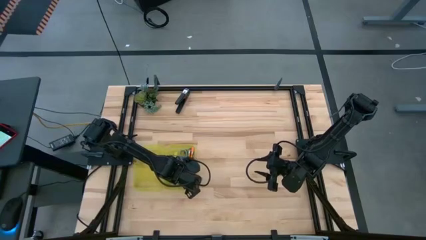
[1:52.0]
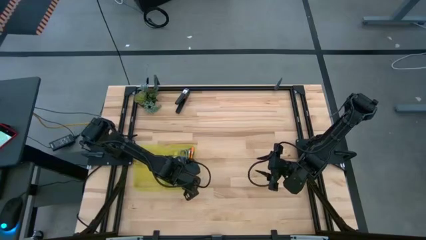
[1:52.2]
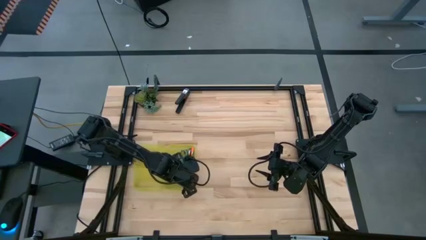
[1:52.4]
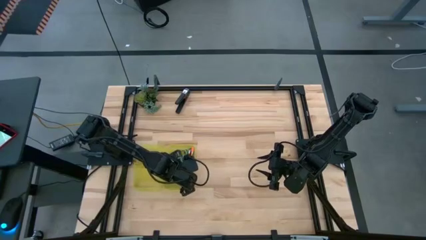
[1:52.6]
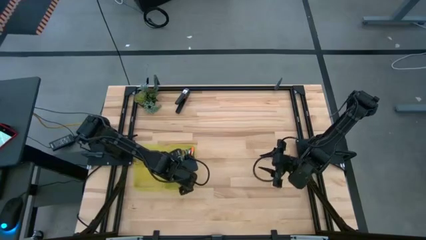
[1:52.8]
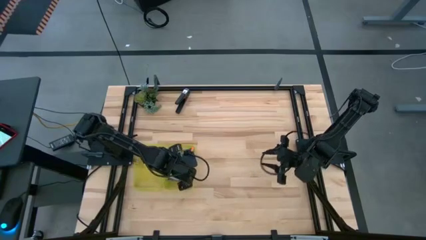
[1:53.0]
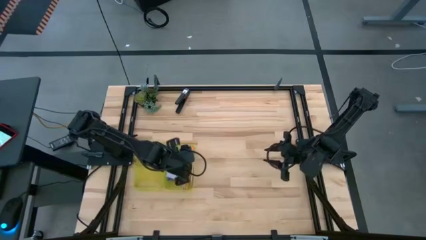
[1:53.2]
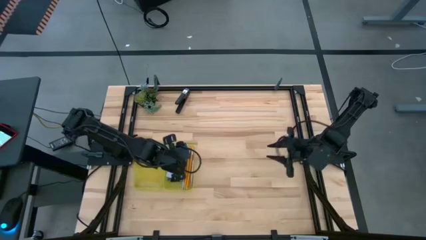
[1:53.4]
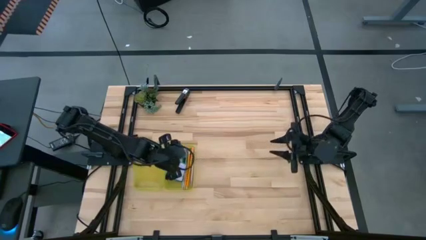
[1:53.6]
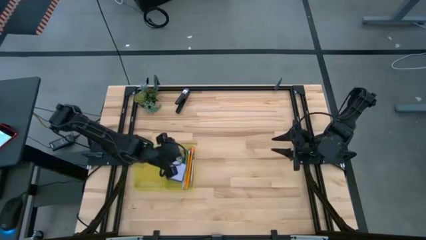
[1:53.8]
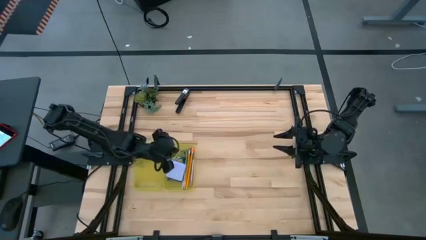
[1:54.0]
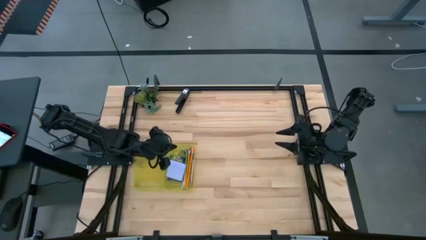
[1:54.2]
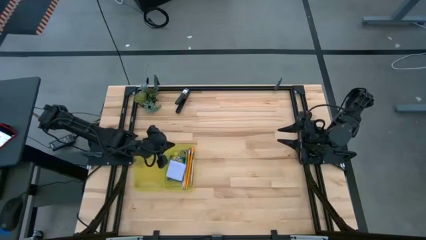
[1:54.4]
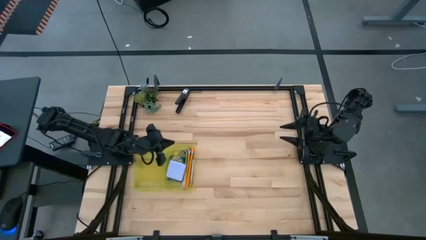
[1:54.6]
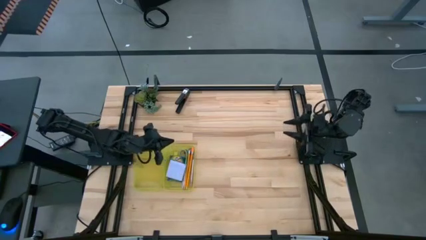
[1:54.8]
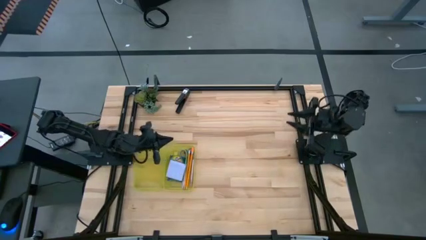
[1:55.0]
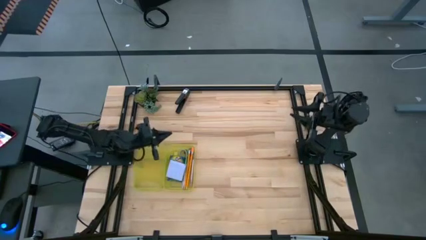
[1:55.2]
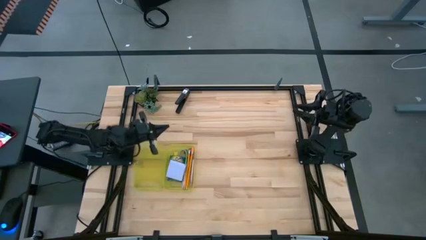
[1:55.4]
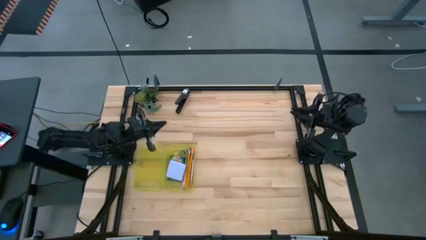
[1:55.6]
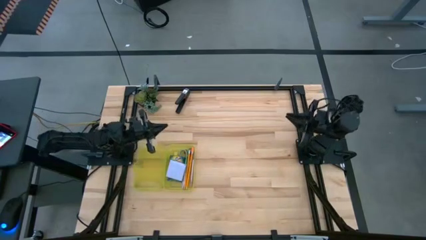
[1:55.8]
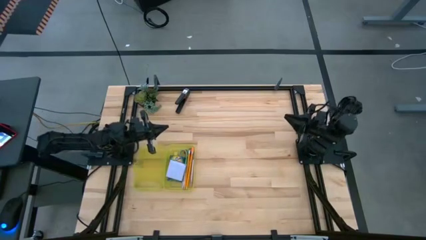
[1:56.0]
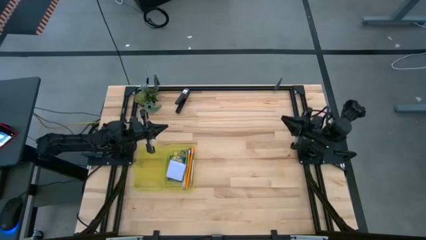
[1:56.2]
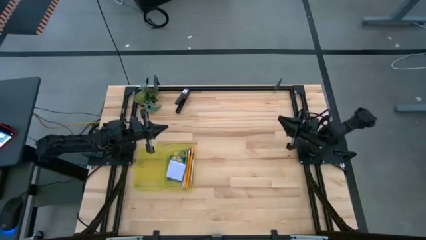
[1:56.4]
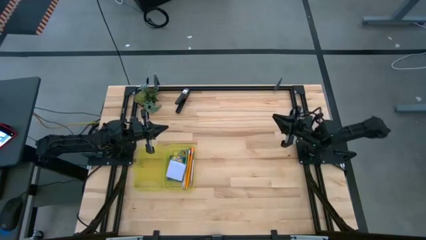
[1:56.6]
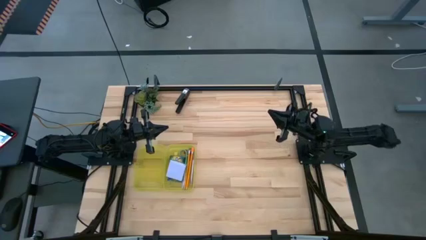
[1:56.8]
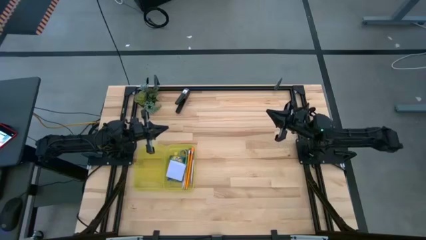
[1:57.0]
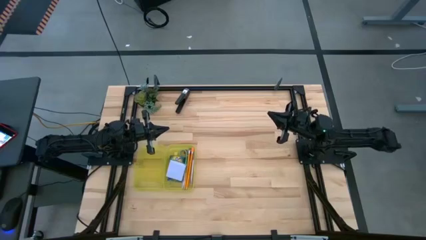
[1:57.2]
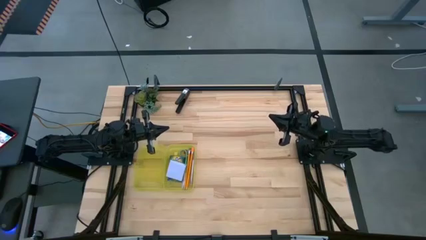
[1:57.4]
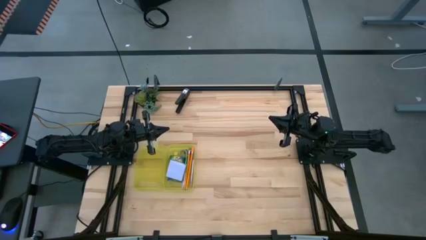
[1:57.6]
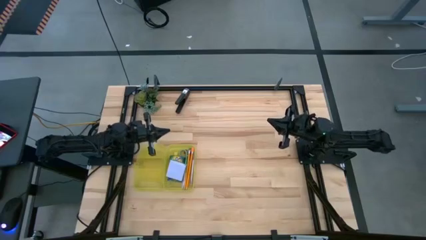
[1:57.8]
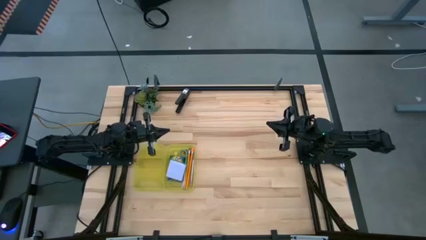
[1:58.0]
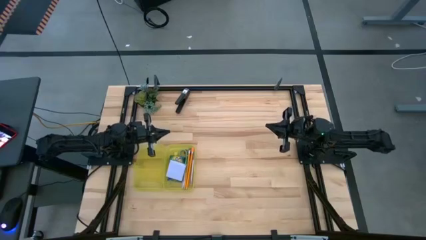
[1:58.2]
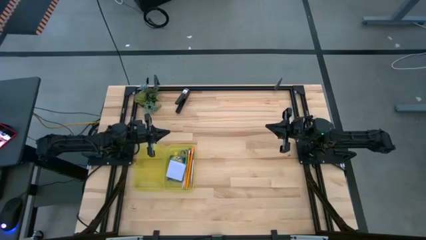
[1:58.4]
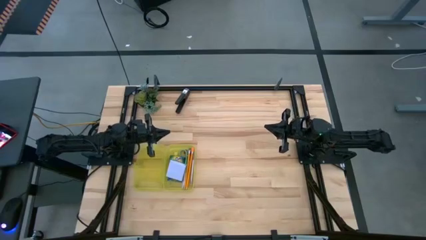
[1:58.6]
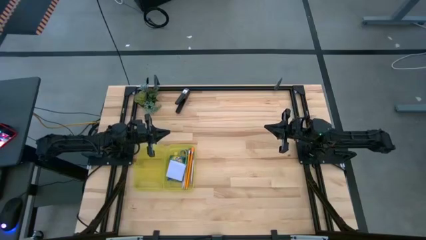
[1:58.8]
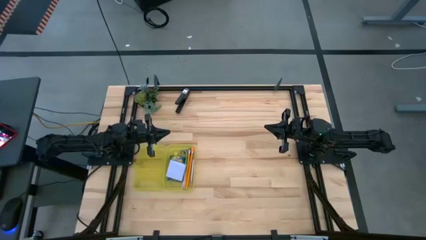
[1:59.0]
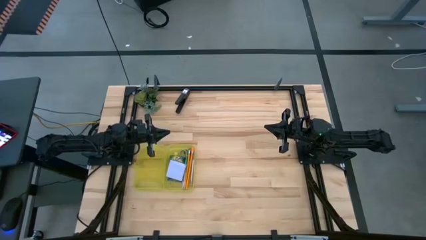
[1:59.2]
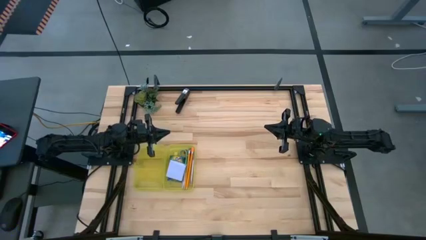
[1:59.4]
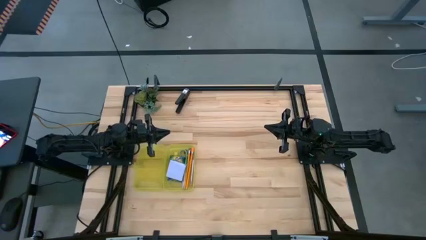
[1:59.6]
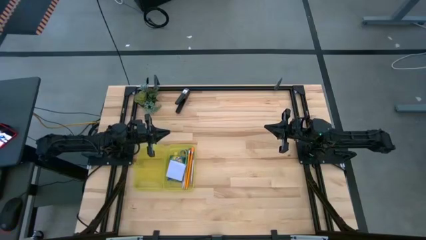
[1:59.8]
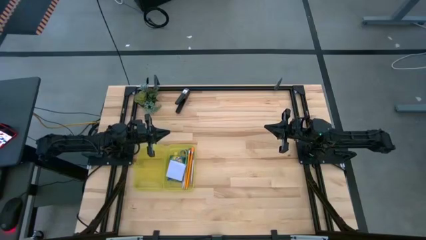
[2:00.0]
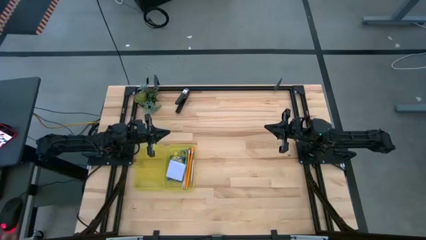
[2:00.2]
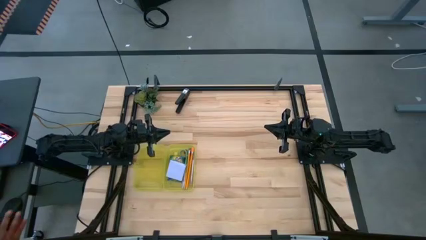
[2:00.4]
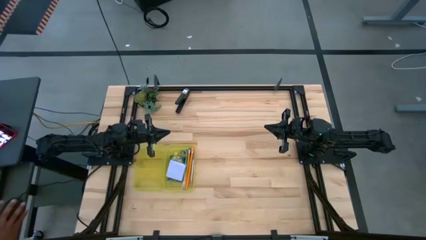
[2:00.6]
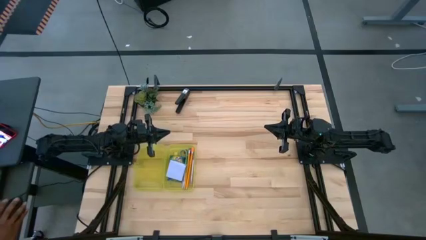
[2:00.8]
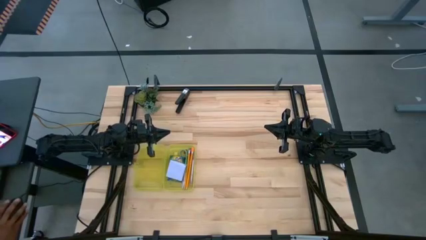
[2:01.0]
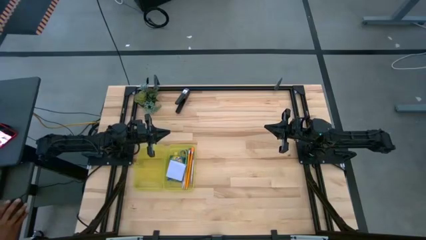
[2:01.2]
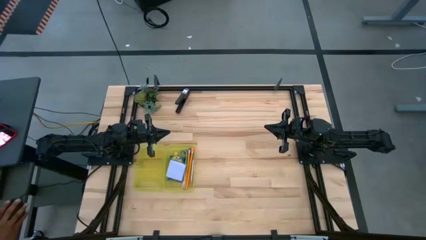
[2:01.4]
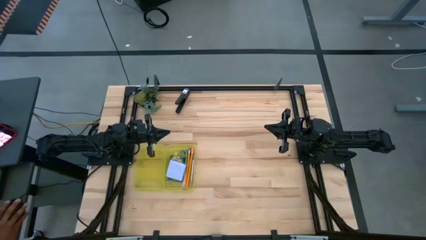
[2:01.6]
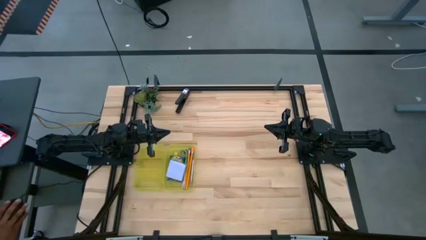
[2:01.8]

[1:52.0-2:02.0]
Task: Pack school essentials
Return to Home Position

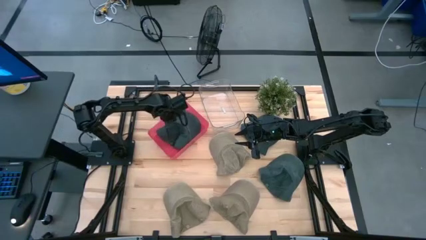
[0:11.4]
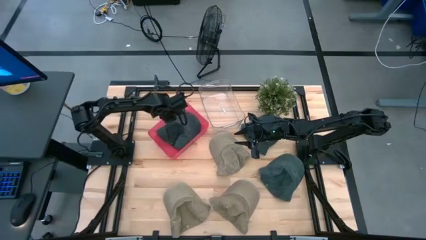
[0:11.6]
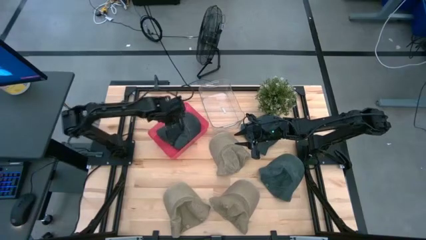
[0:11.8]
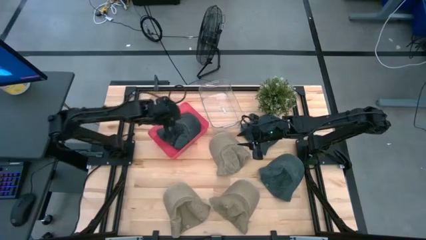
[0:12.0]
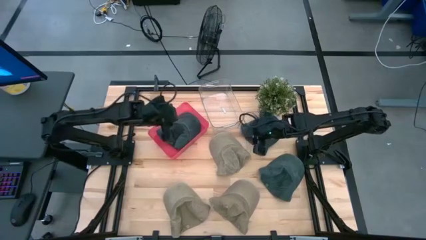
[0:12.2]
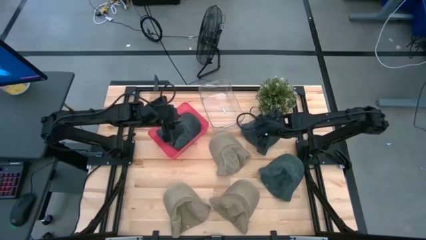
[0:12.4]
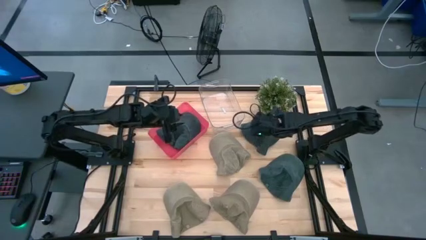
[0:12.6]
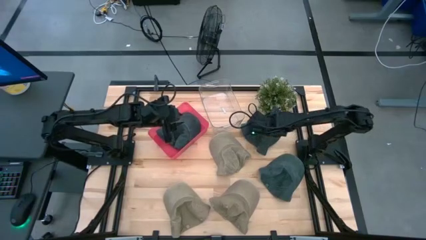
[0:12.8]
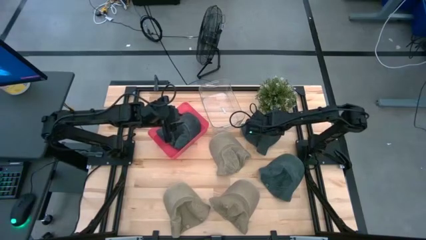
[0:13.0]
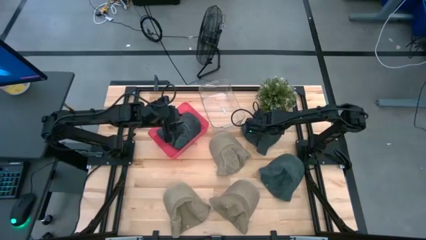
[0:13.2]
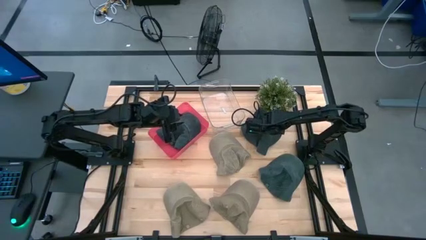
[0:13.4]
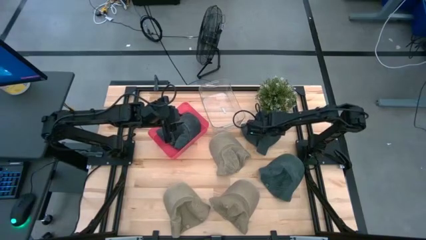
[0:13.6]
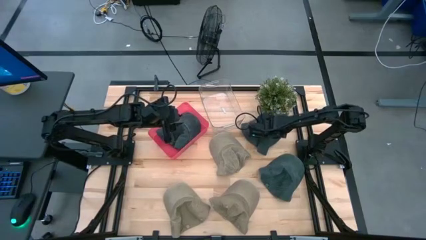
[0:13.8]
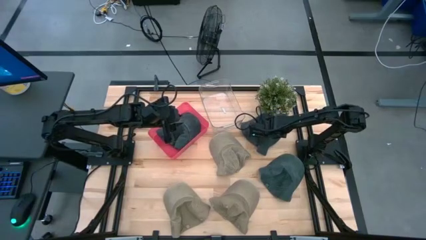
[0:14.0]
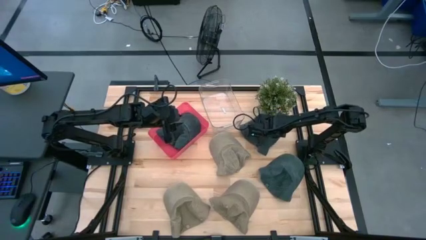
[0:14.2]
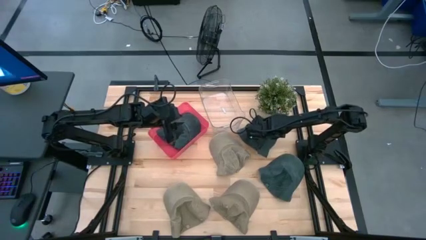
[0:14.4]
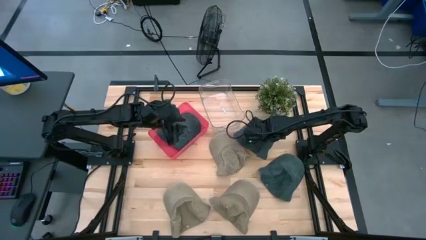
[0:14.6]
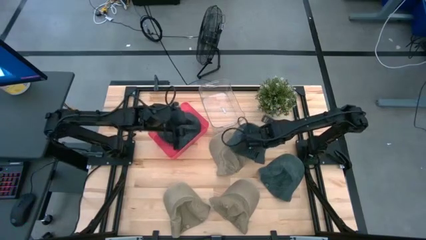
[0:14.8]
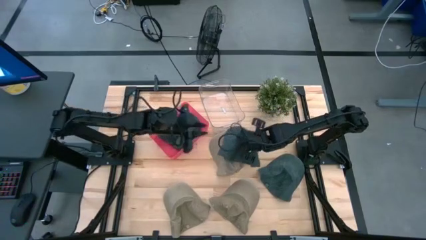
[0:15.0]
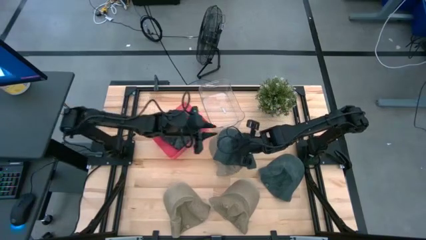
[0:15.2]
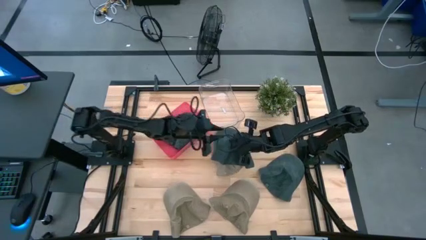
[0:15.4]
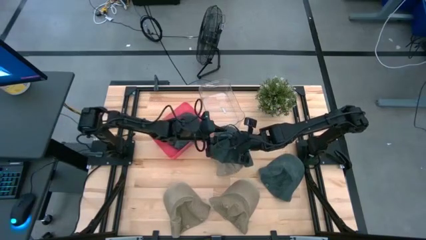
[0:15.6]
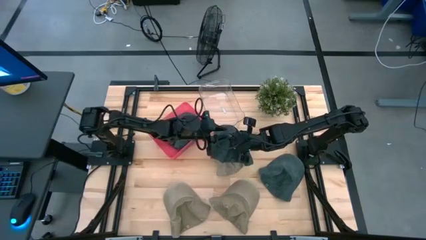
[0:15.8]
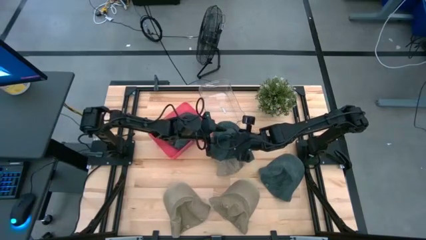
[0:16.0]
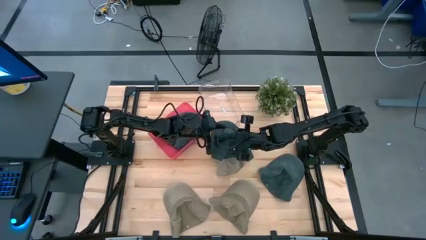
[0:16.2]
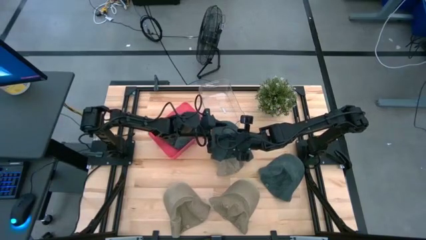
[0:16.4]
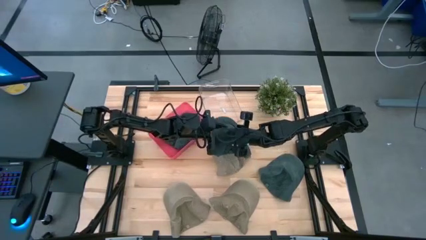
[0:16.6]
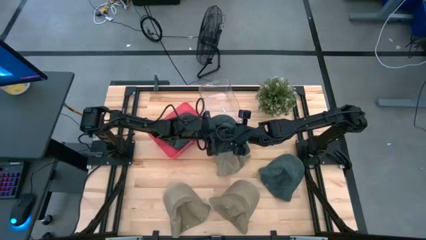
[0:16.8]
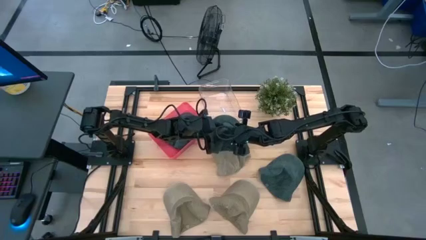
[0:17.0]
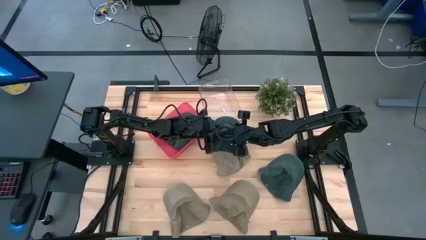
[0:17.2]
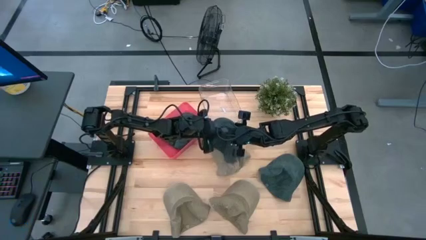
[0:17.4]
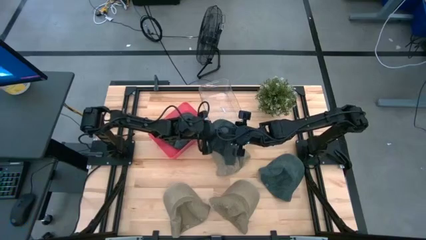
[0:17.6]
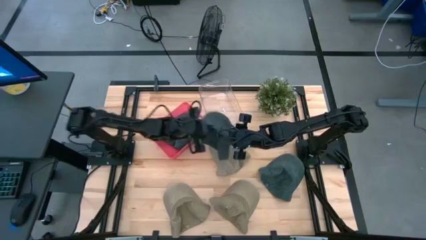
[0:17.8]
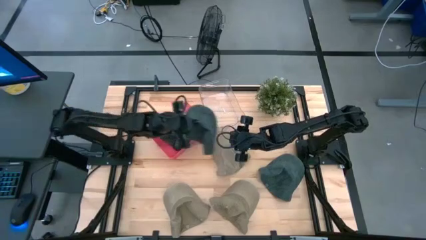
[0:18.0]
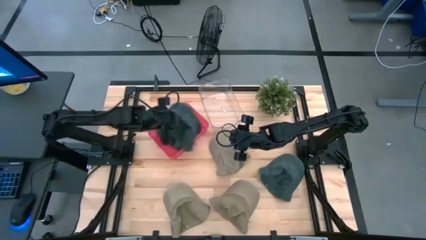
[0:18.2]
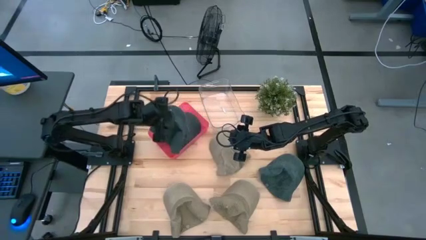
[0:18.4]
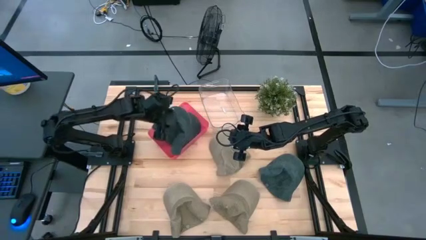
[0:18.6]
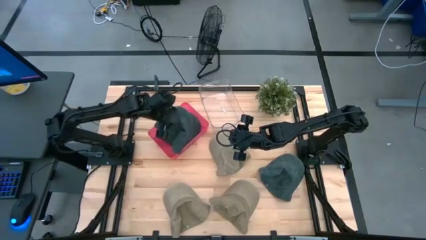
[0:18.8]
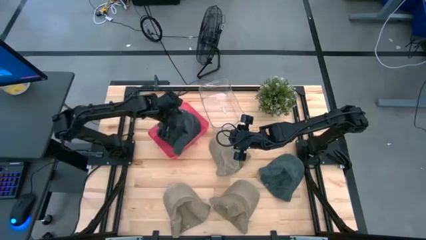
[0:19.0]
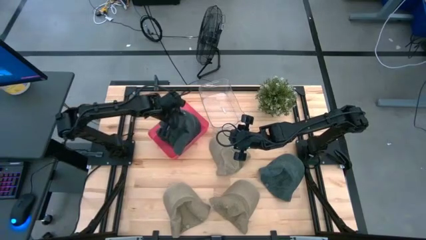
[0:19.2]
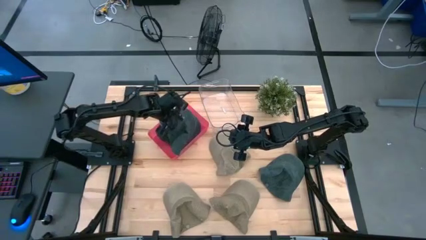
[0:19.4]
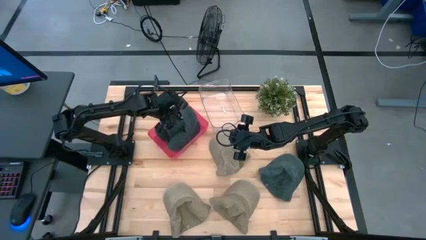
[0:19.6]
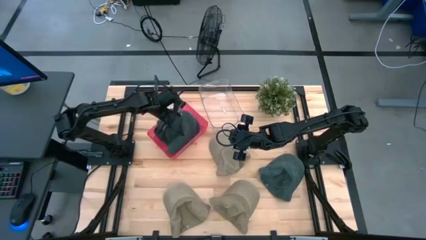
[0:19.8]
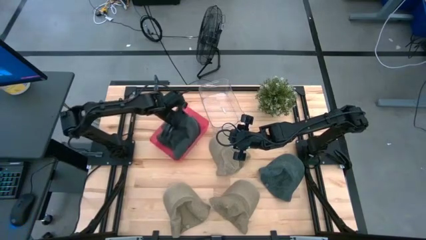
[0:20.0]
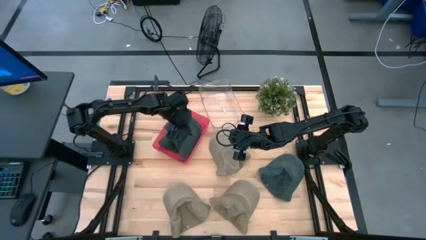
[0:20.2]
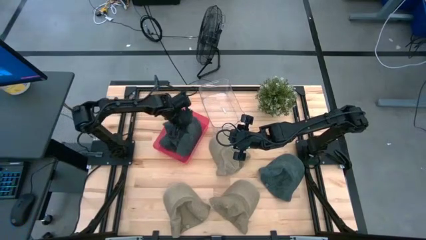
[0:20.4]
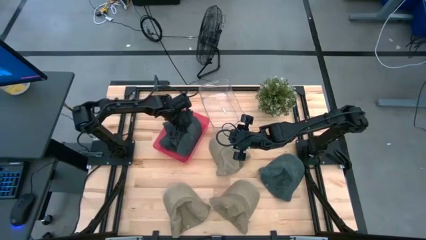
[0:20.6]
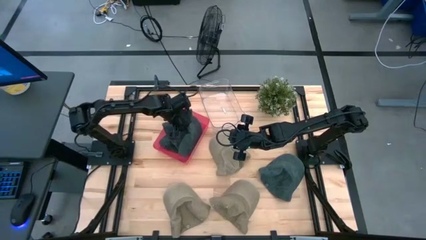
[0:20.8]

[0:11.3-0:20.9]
Task: Pick & Place hat
Put the top blue cap into the red bin
